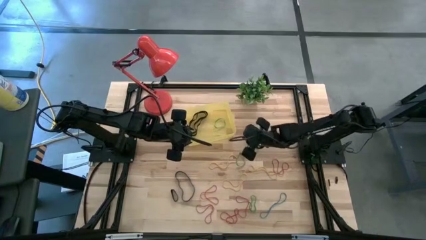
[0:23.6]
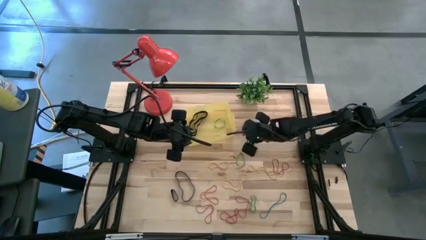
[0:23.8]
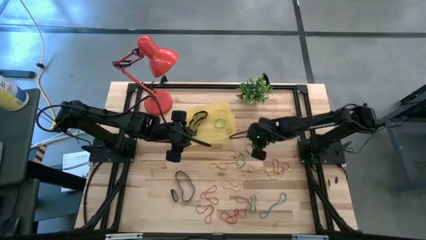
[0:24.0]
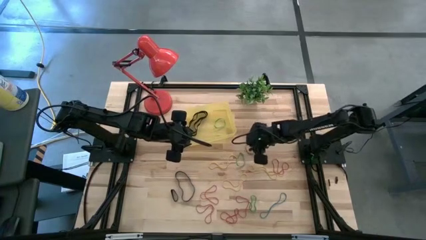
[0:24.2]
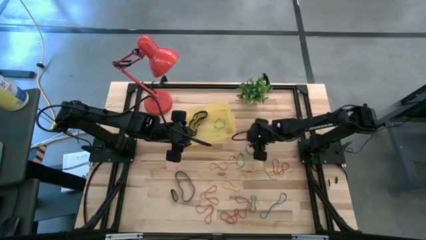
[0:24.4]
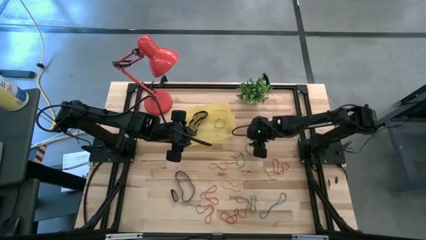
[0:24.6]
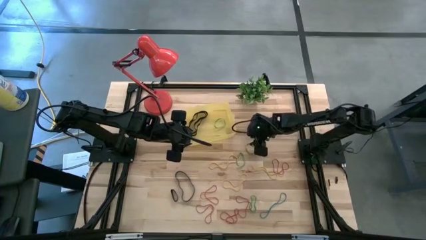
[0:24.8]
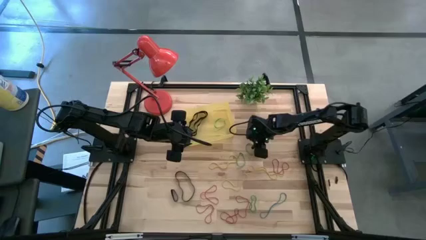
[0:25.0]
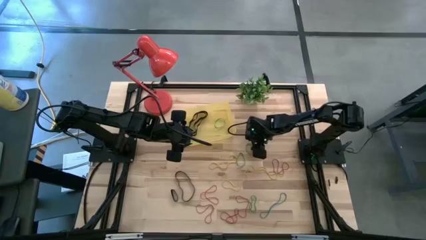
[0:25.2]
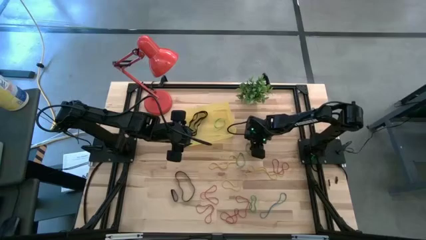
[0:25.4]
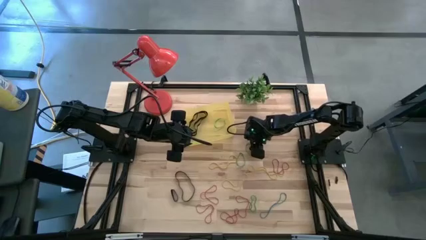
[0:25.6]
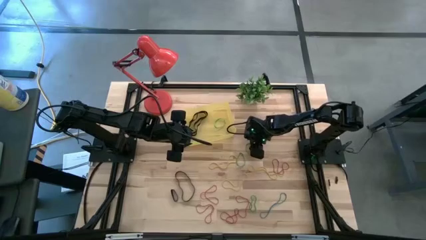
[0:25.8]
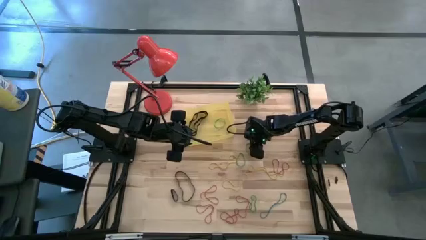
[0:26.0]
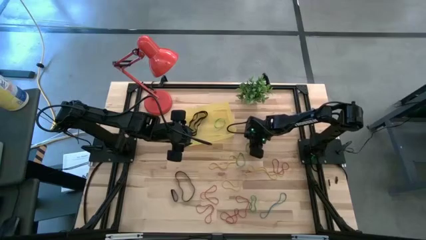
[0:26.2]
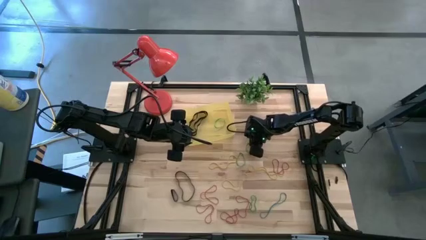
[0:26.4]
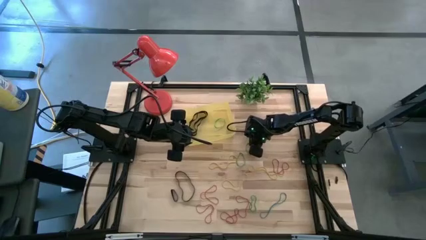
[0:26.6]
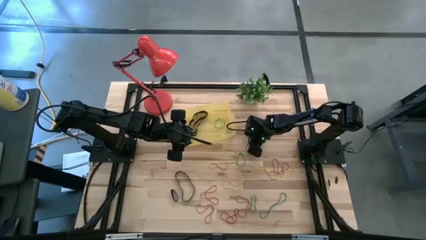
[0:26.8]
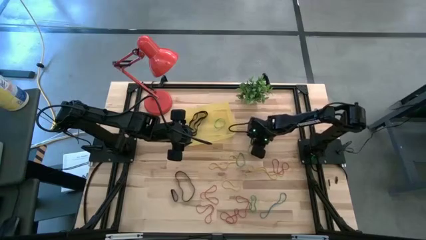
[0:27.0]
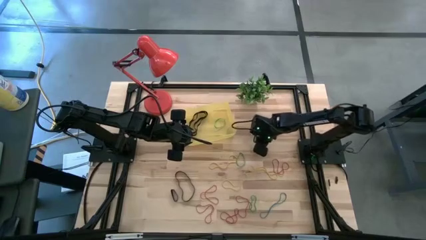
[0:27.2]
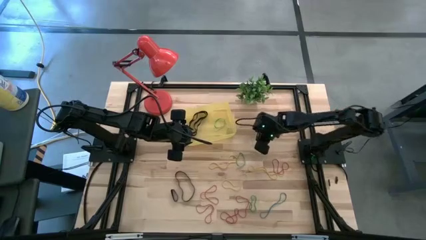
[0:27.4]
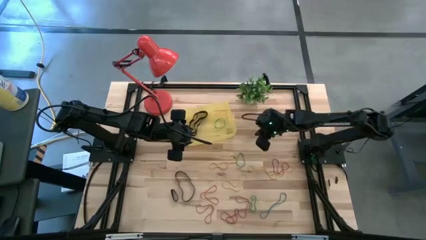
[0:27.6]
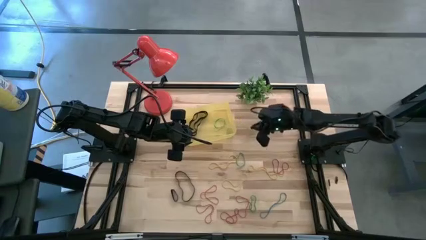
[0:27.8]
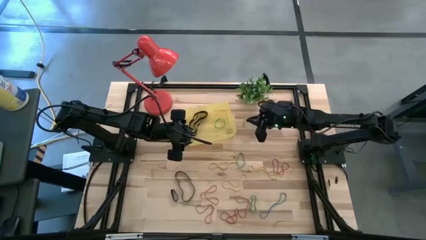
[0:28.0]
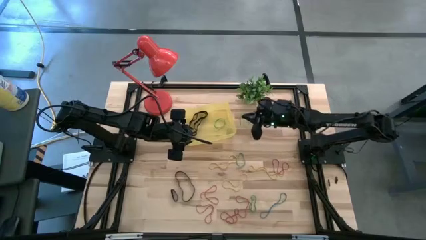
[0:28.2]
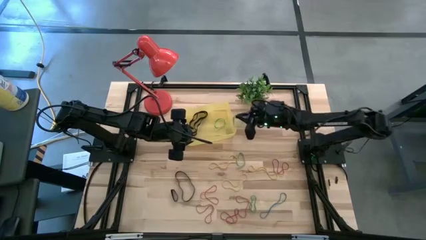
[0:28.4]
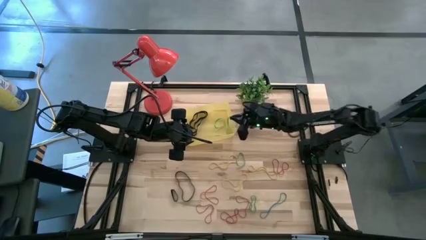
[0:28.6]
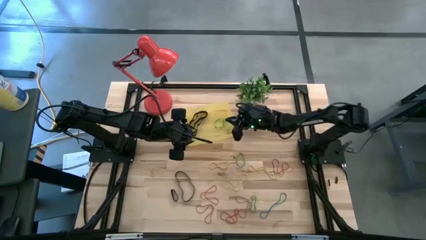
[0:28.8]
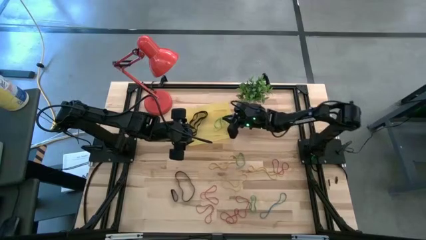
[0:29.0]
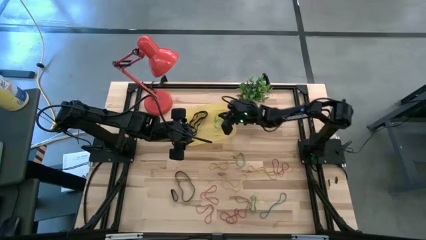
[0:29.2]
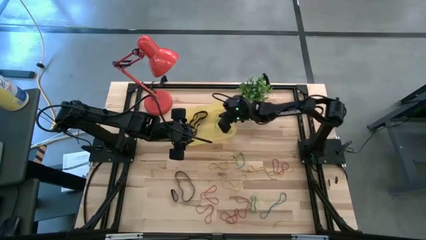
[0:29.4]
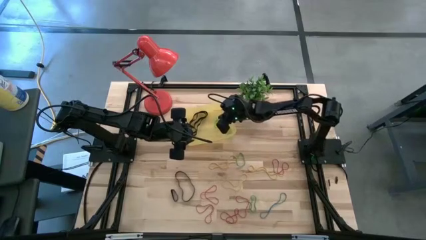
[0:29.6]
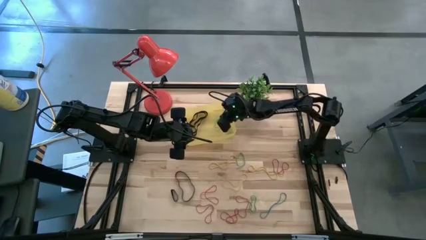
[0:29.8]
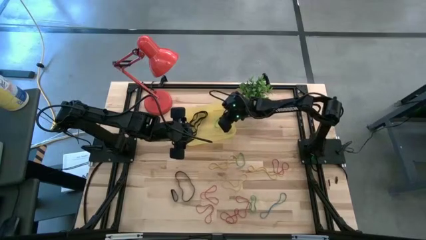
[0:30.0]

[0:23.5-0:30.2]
Task: Pick and place rubber bands into bin
Put the green rubber band into the yellow bin

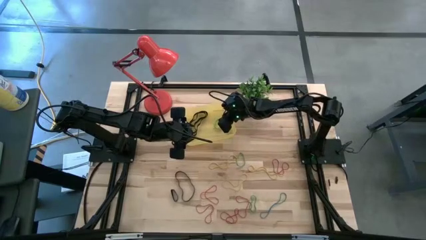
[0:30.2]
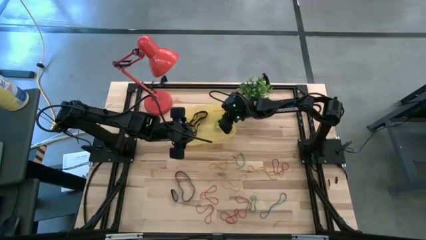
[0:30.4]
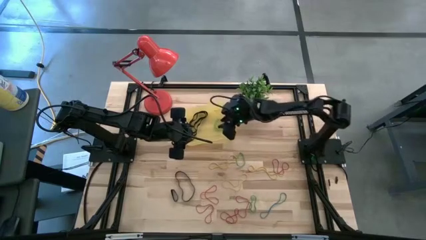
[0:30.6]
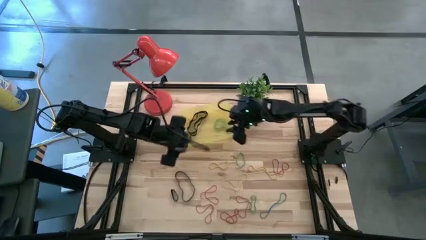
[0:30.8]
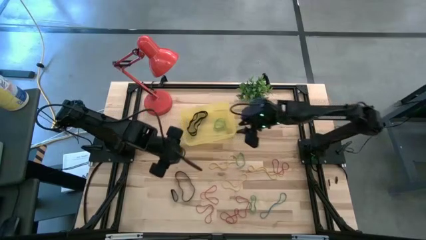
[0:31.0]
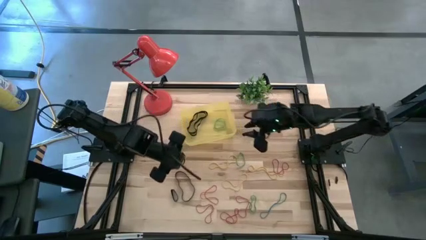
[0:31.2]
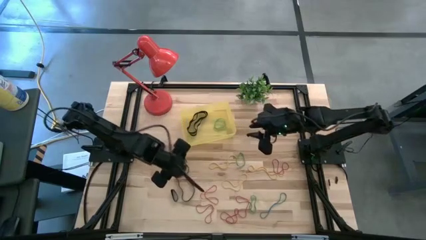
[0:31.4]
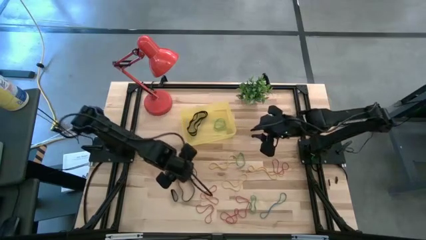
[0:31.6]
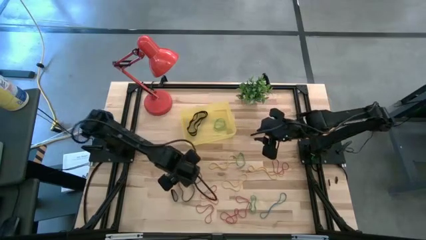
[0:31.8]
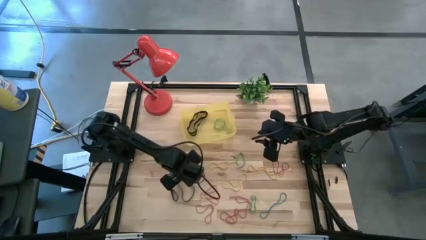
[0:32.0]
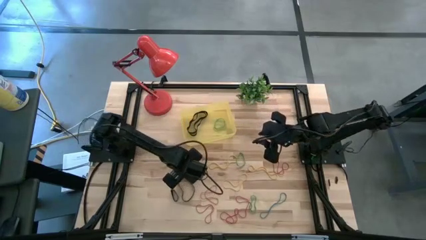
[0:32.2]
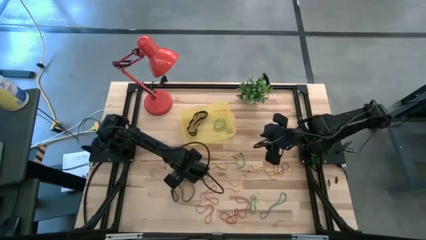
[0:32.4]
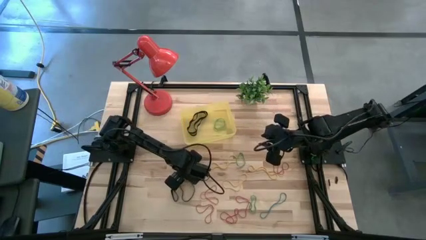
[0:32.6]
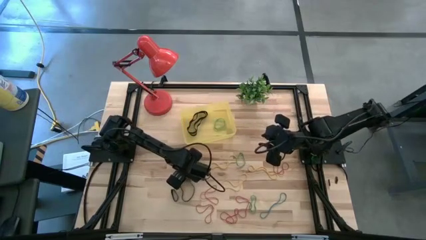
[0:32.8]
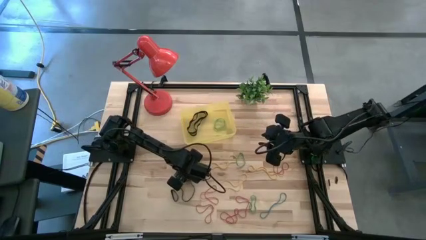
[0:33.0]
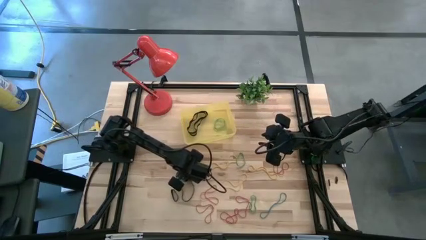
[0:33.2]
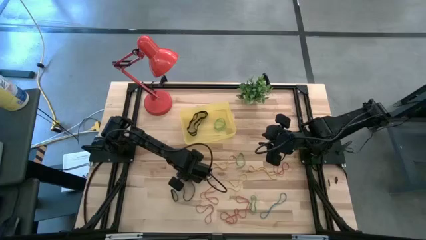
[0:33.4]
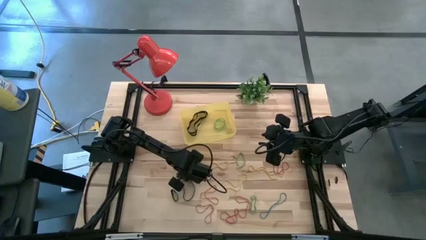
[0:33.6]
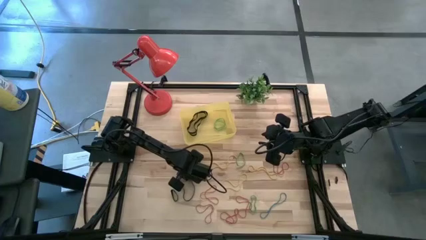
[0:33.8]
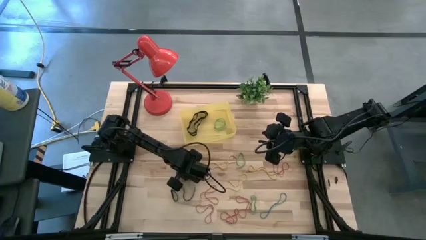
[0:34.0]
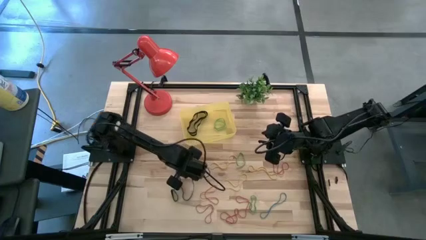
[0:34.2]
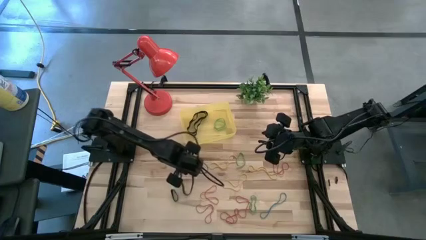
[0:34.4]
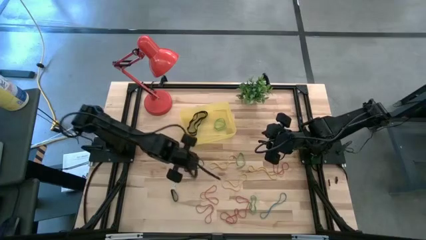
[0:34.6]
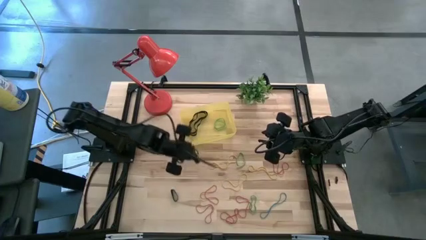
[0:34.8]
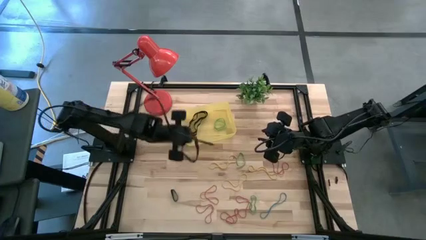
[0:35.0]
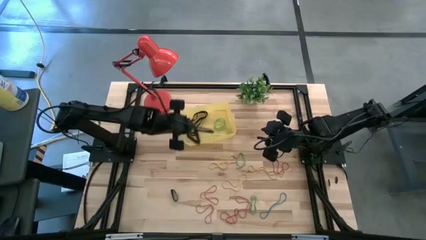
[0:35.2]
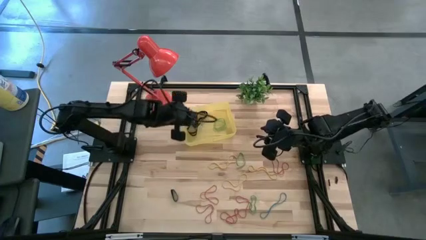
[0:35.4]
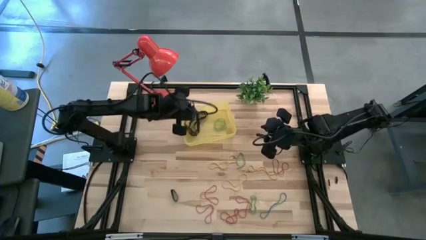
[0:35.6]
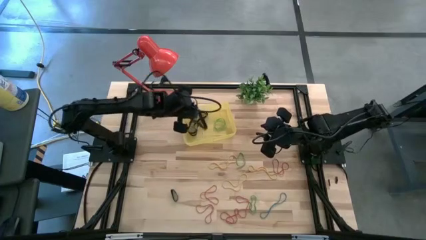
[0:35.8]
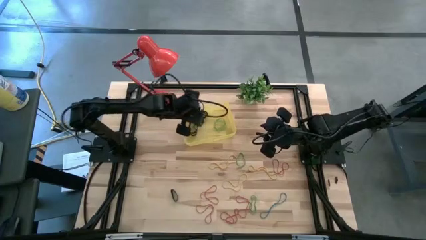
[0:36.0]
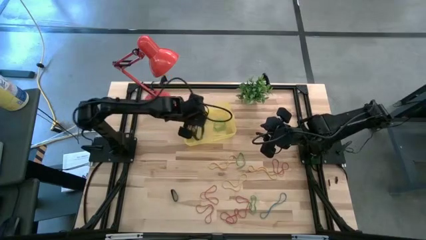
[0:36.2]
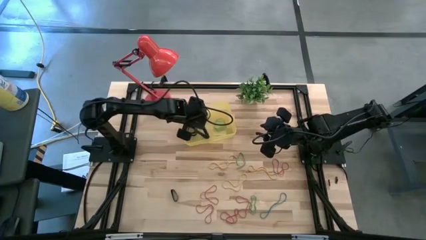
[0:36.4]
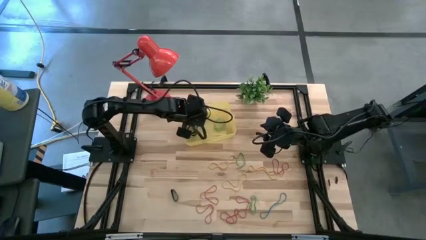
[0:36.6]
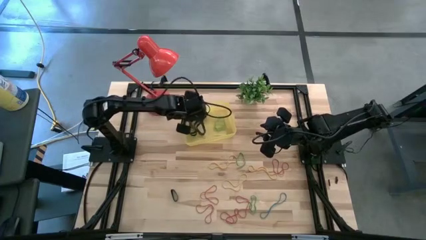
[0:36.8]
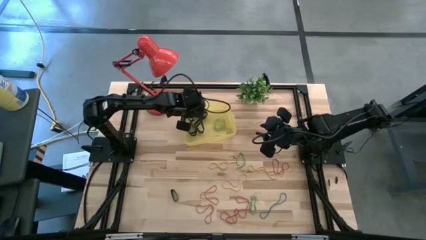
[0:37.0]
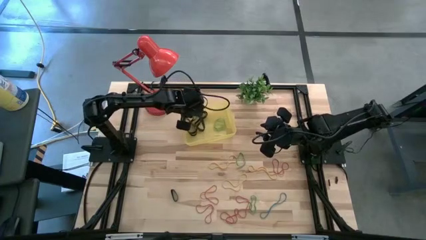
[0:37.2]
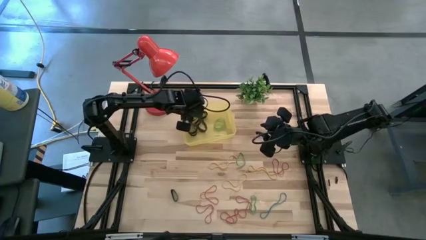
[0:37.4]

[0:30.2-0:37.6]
Put the black rubber band into the yellow bin

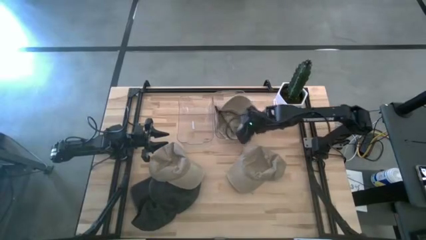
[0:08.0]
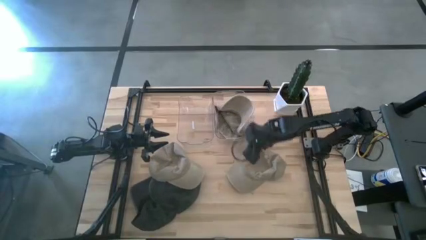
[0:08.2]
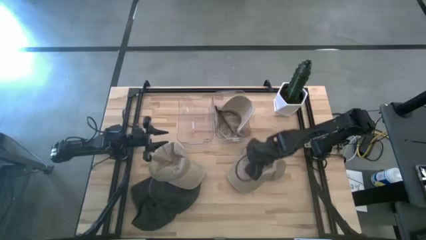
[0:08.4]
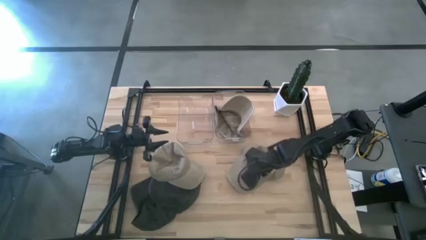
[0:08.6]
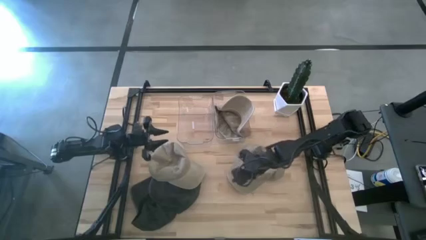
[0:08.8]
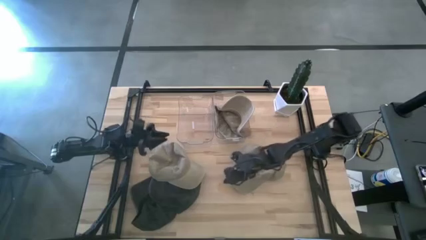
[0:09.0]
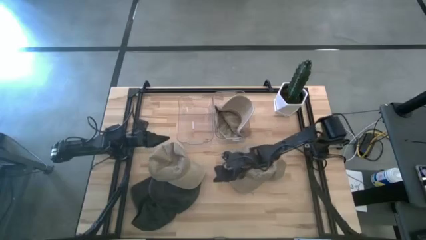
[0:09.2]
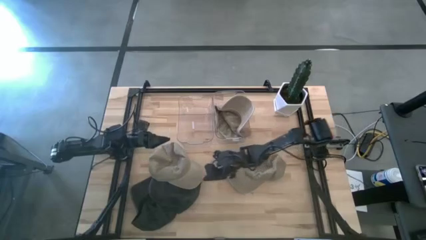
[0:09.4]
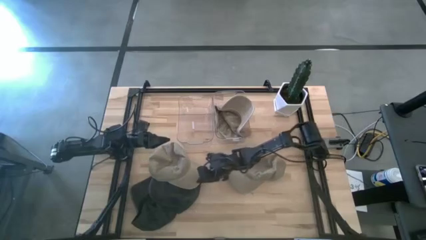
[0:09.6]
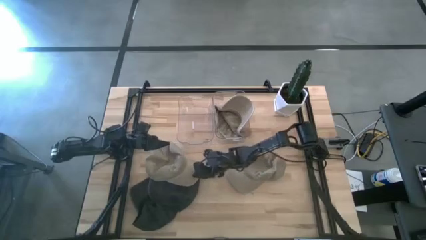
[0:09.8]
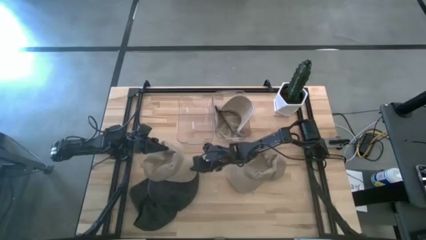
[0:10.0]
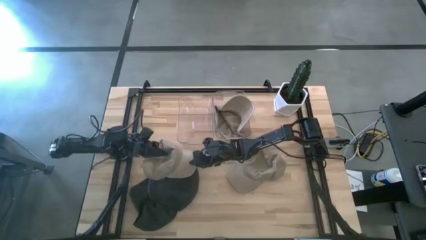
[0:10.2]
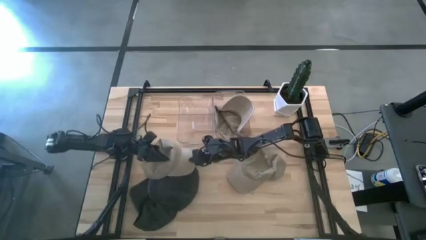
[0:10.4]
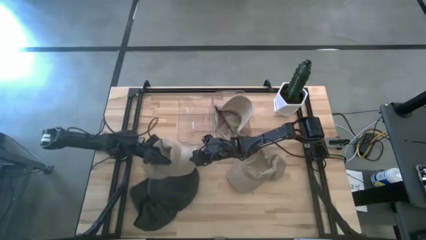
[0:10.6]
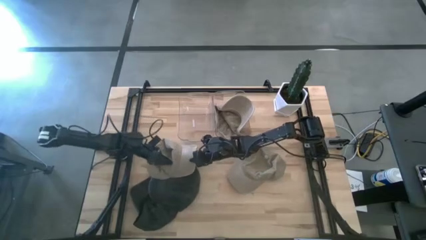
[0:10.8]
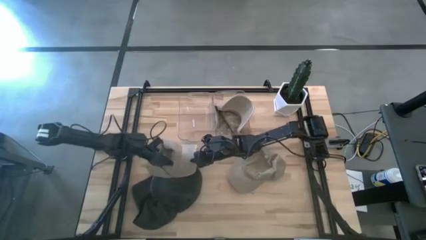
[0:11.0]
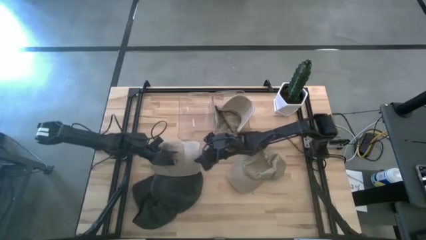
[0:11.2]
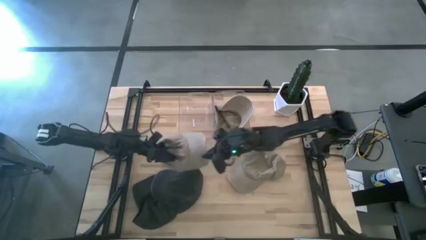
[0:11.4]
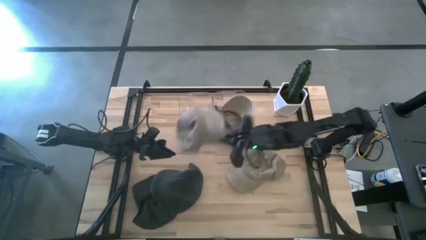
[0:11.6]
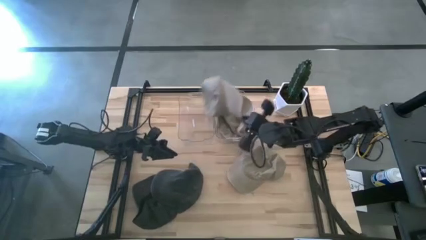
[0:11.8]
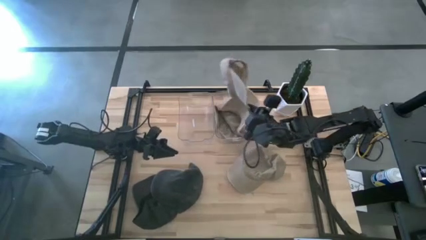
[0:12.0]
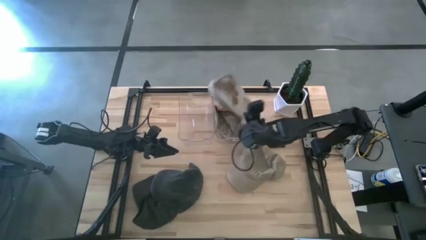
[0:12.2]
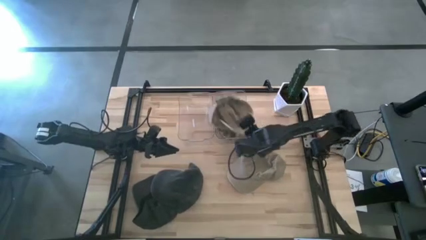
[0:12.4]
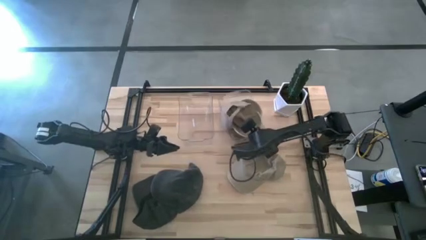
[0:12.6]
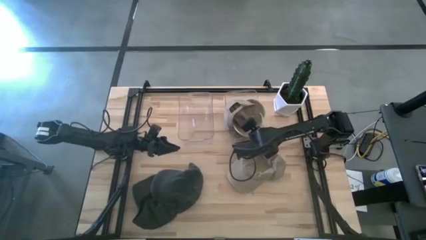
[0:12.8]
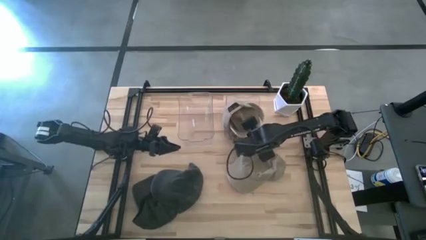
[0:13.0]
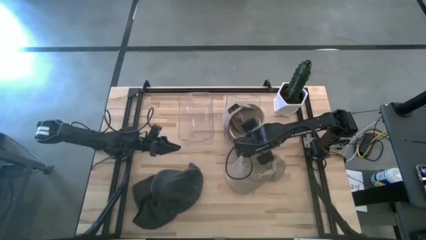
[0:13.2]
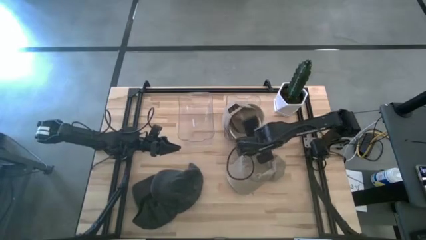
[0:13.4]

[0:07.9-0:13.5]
Task: Pick & Place hat
Put the left brown cap into the right transparent bin
